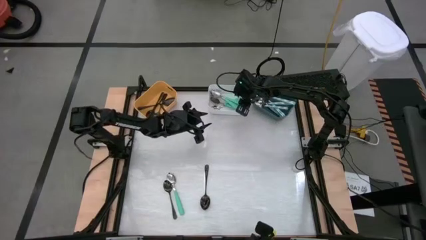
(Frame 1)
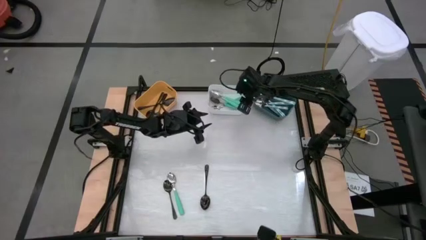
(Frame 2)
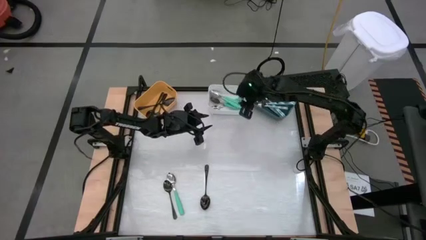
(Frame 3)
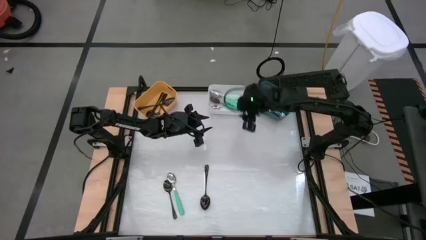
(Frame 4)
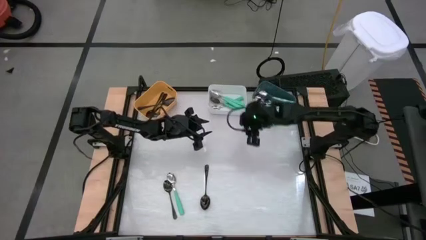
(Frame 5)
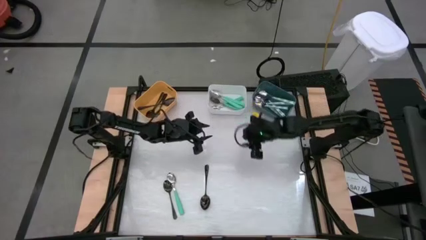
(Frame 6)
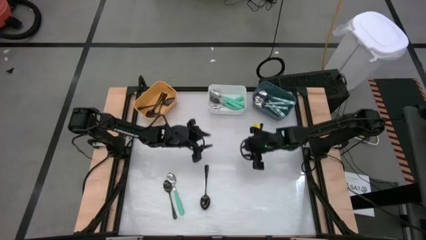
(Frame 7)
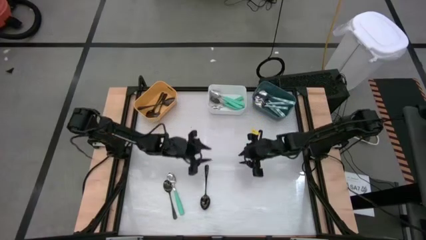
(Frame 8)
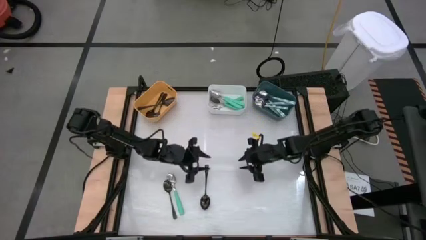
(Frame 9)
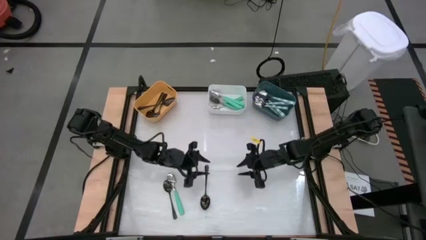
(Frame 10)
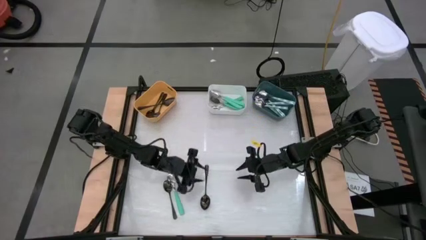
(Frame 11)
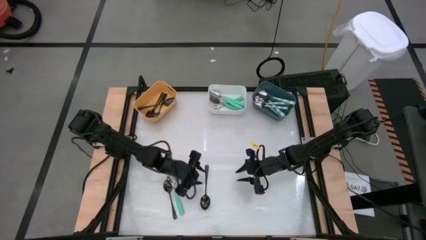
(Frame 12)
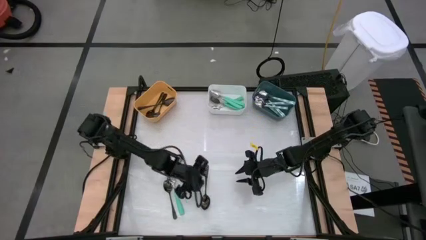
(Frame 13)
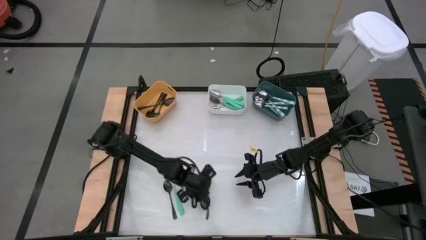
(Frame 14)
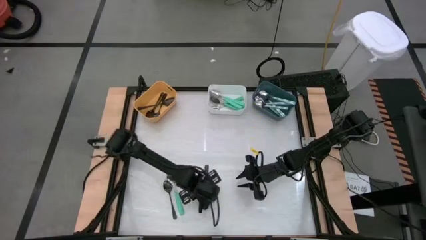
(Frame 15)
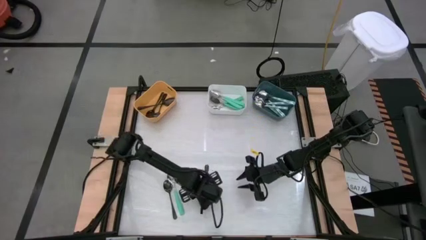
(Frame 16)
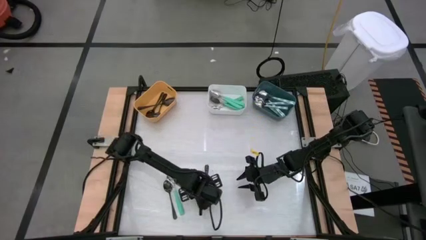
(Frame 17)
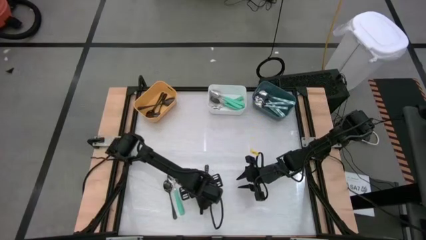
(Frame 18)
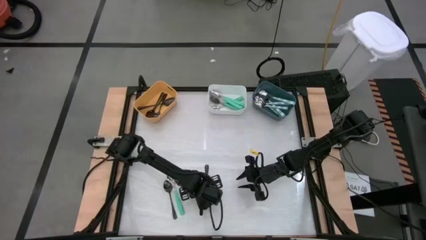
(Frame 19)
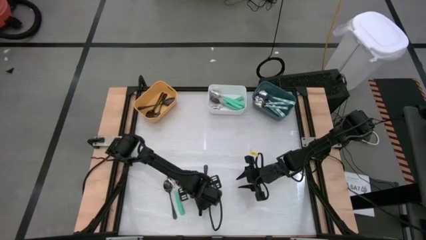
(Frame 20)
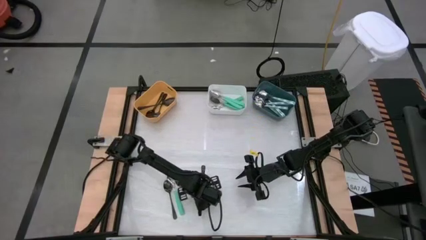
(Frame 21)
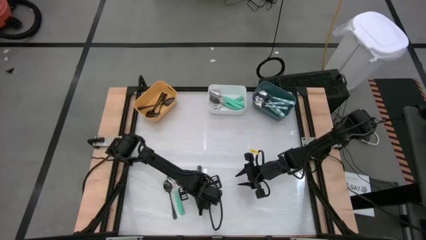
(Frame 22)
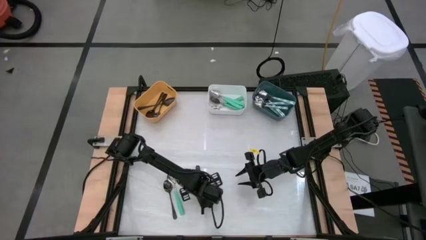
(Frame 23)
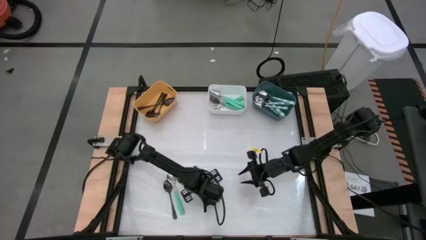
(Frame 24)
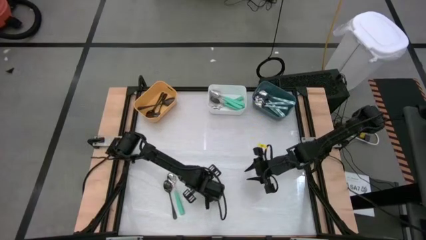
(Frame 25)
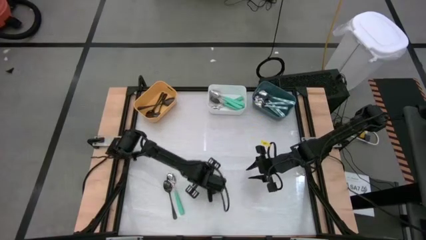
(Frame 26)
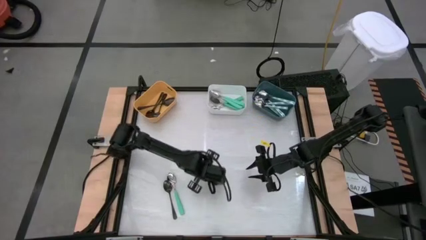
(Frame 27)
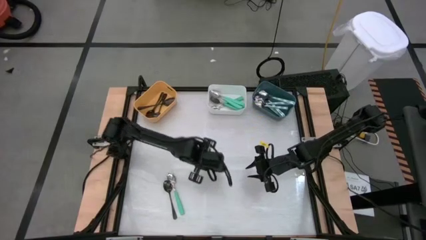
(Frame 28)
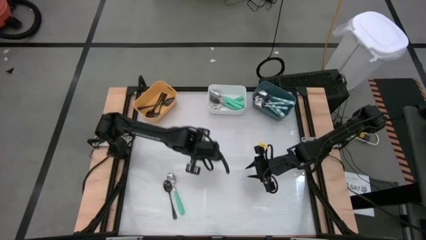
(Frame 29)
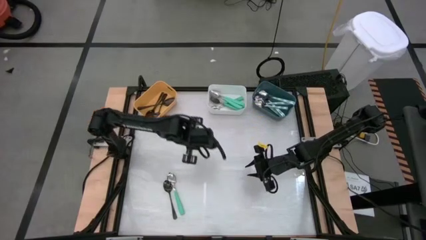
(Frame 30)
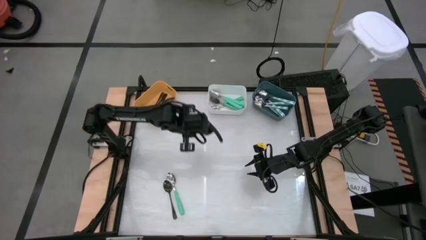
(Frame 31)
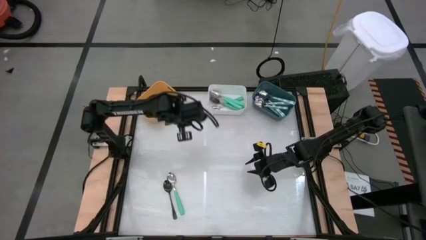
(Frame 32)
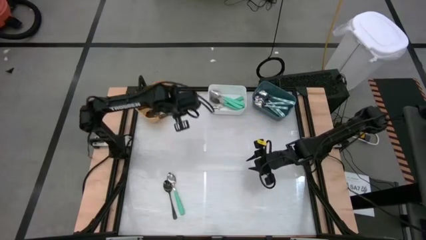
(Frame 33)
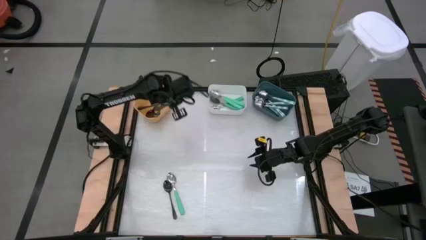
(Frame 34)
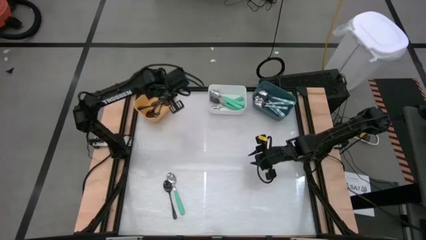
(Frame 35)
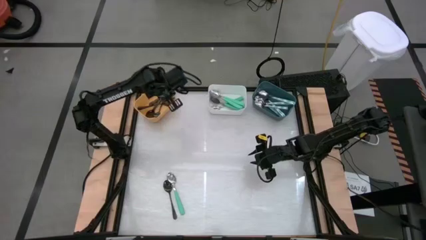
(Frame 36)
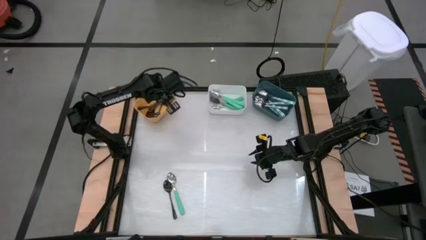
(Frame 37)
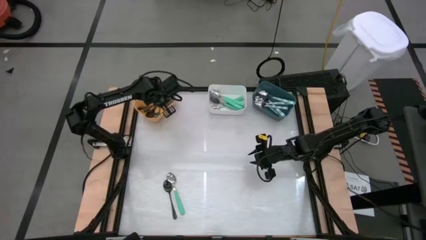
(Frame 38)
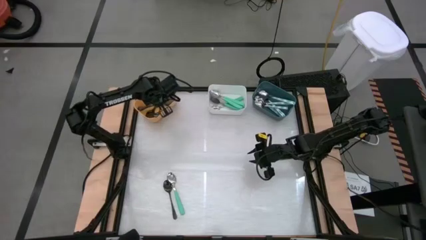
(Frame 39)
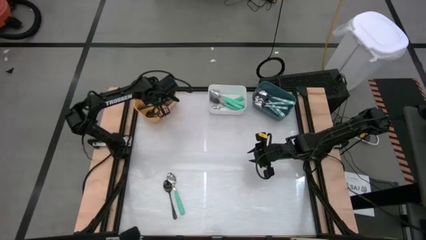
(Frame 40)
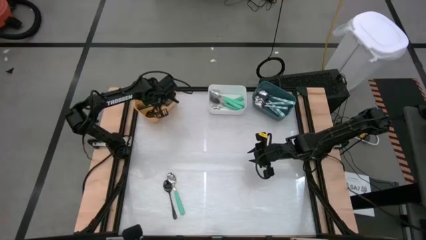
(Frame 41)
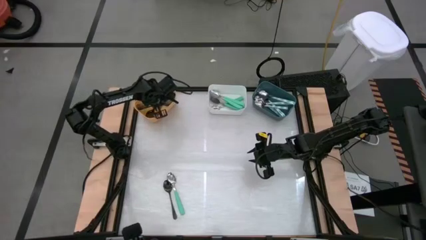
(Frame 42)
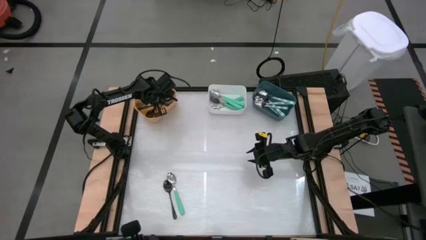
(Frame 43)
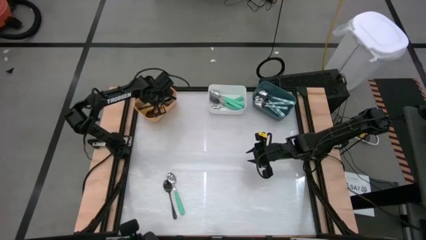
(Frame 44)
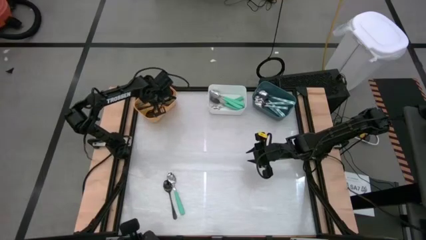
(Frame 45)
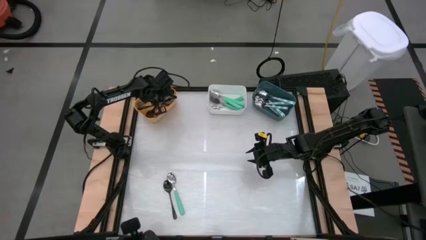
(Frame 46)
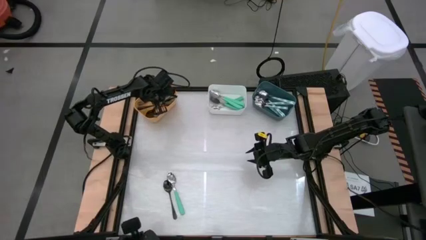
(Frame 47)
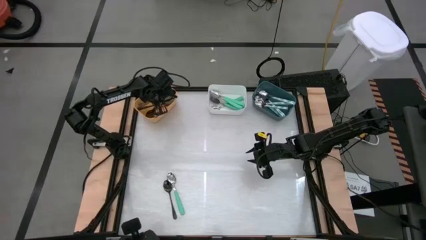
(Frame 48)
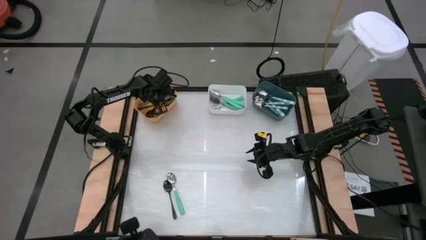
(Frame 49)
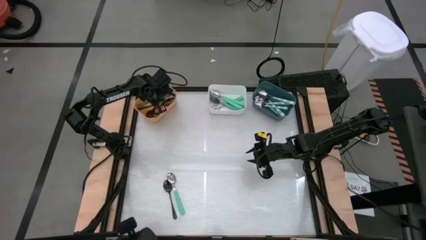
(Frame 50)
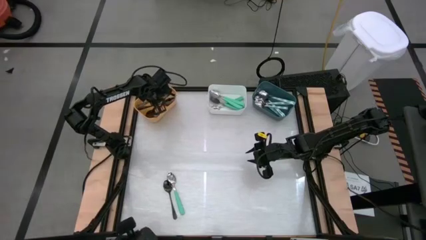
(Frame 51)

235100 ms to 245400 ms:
Task: Sort silverware by color (type)
Put the black spoon into the orange bin

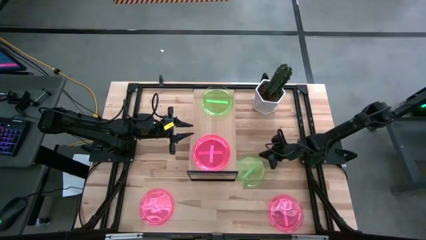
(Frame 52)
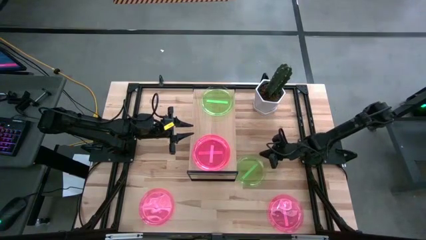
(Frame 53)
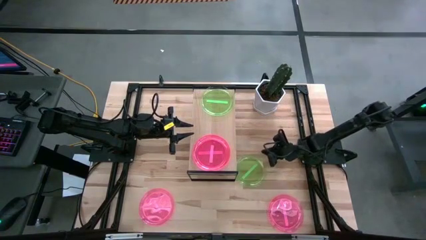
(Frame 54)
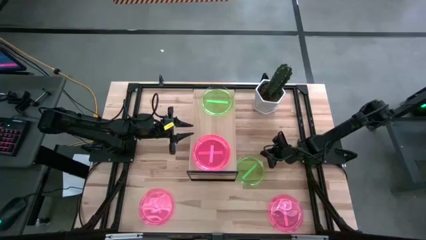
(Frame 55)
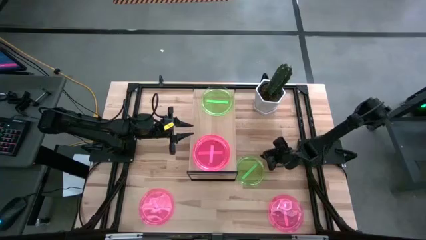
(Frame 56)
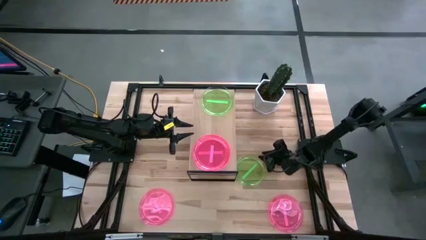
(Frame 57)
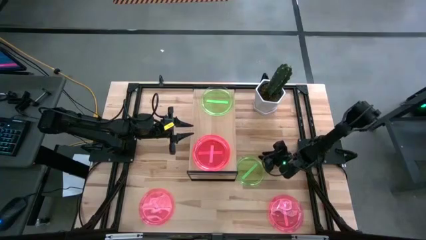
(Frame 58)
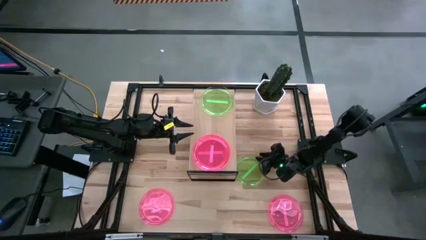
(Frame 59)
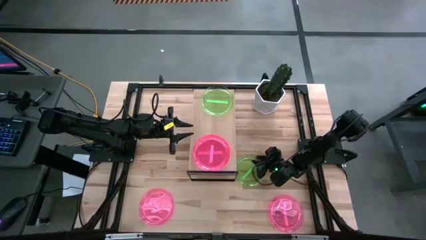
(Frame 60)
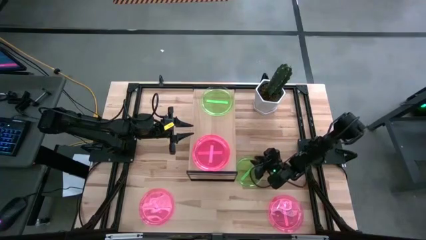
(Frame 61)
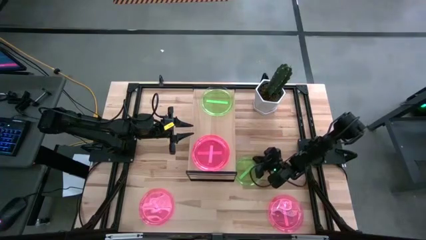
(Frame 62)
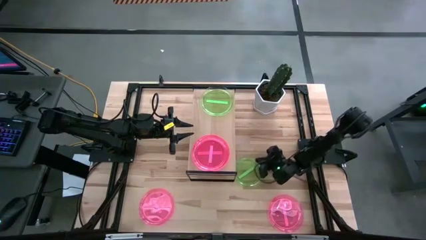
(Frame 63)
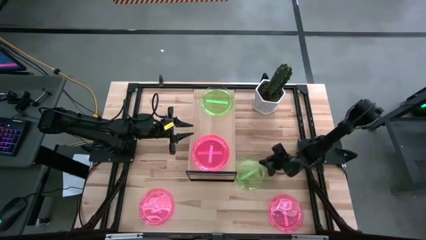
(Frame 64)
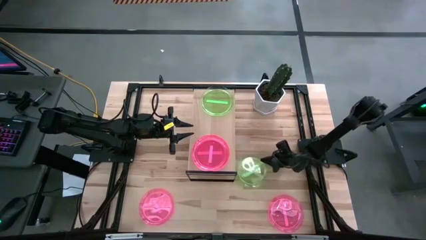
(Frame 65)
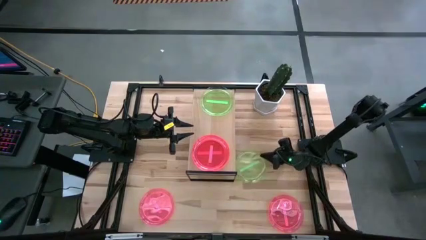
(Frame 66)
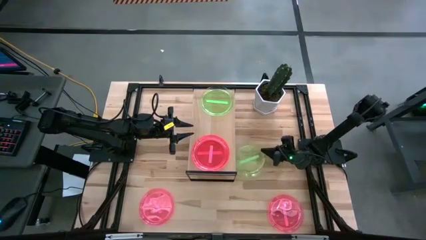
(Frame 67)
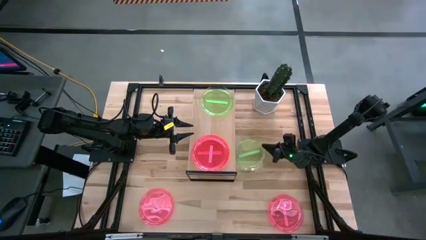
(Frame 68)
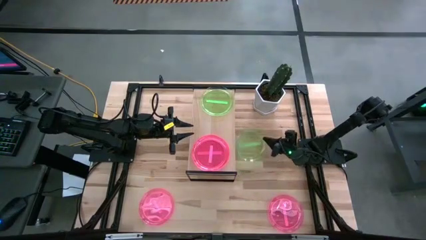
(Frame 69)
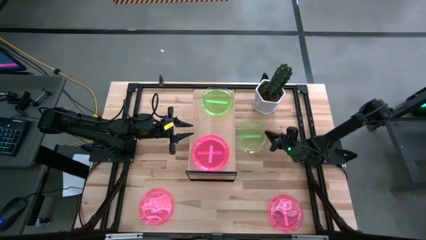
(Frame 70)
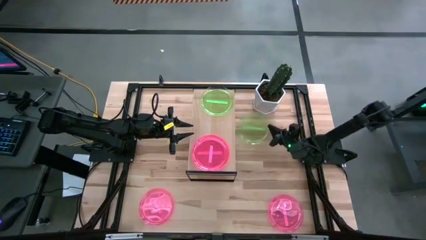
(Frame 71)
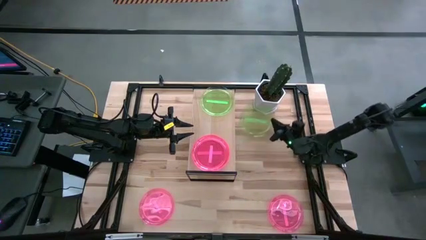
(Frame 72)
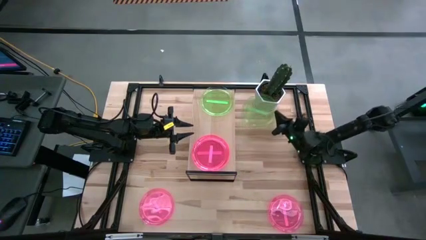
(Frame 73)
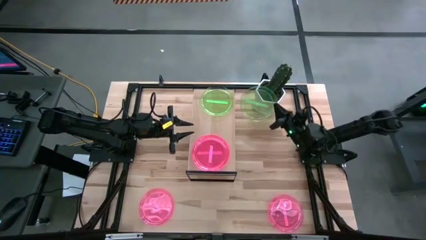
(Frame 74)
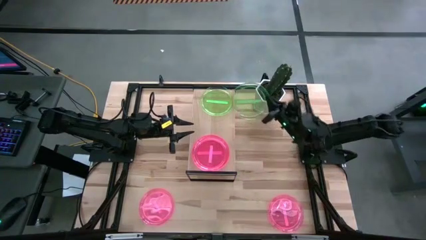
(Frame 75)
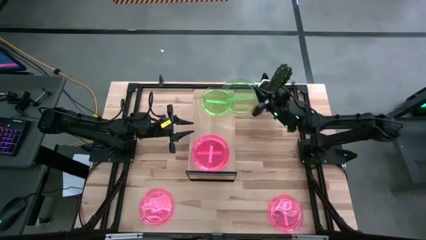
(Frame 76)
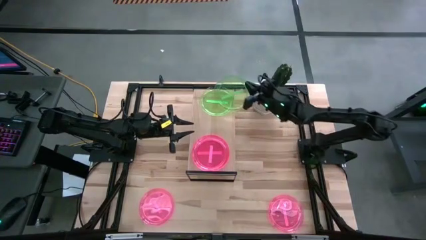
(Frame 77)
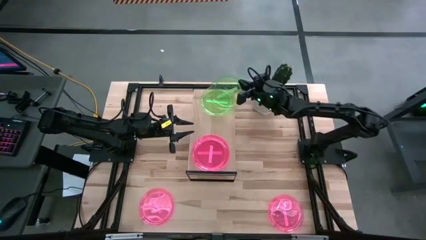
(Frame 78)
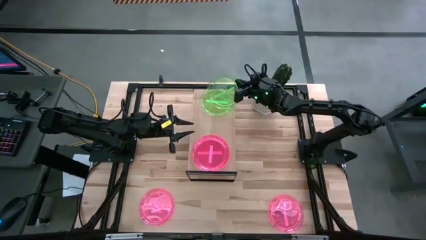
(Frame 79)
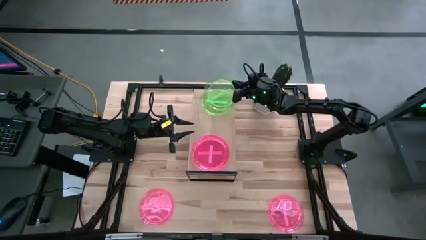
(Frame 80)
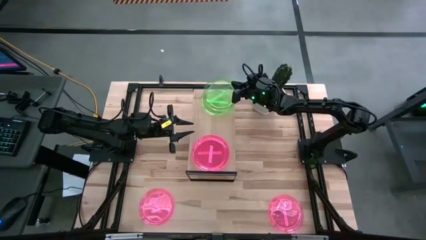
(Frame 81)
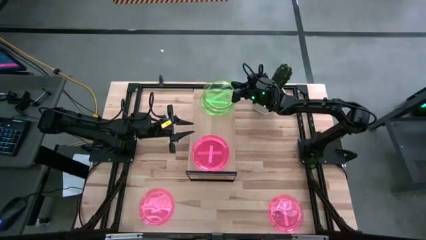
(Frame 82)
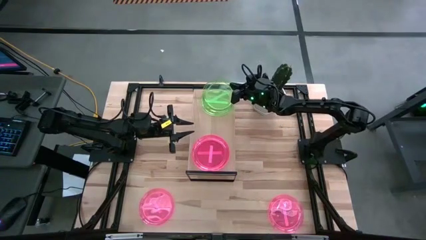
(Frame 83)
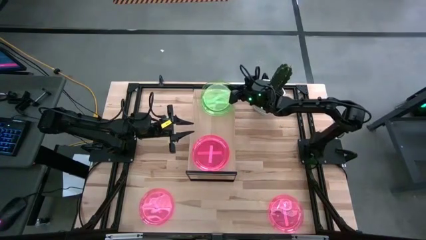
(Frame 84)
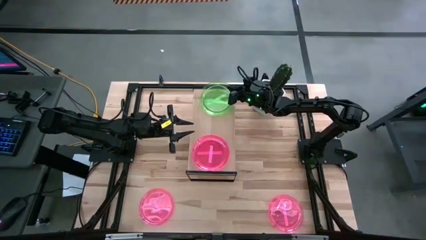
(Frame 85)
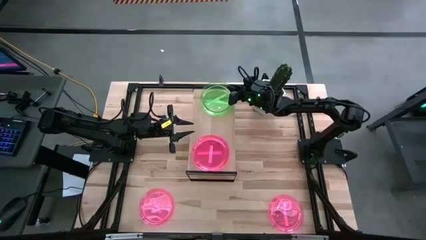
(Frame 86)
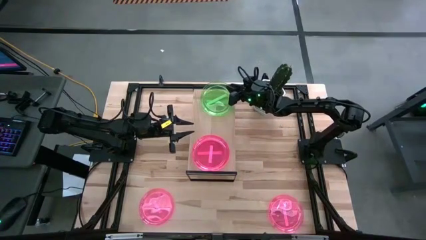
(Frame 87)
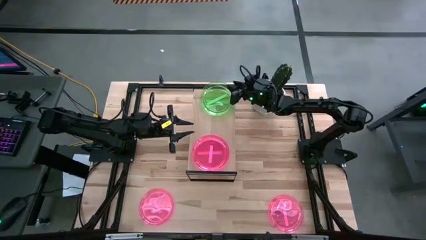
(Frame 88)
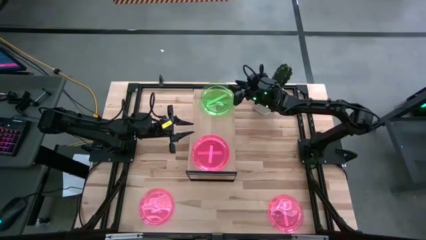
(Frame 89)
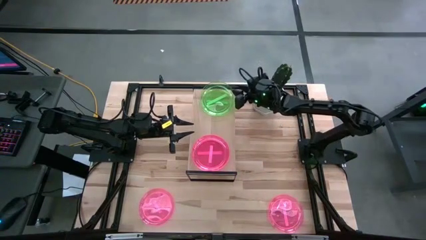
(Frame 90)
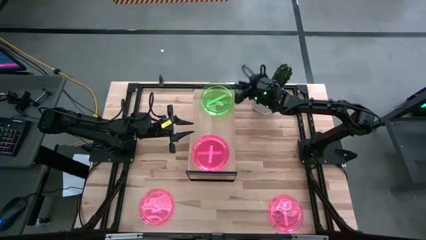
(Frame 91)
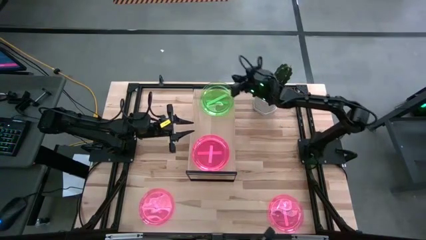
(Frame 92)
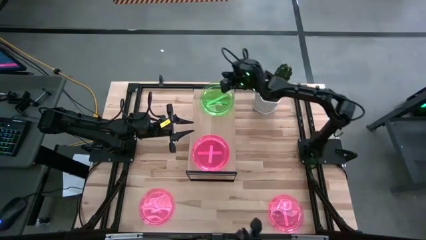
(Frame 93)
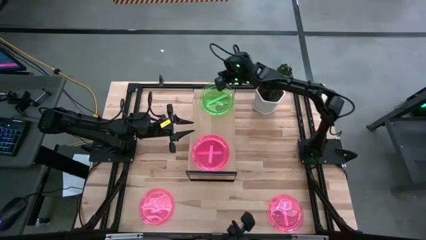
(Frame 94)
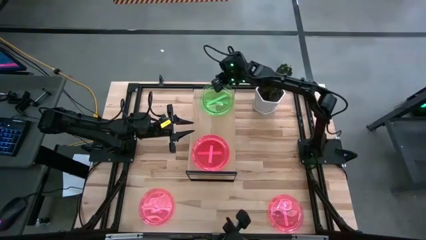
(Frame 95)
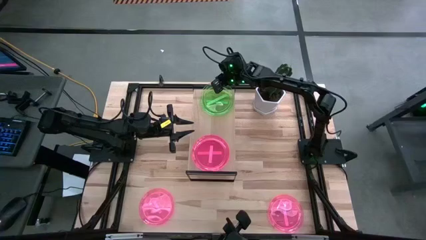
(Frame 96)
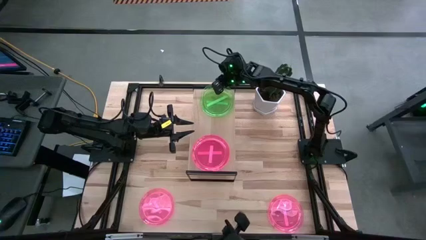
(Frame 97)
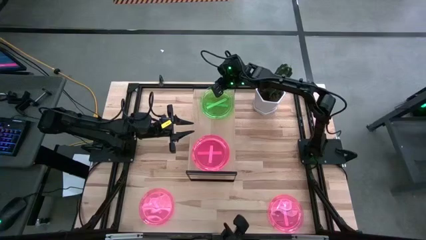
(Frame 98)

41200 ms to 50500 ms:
Task: Place and stack plates onto a shelf
Stack the green plate on top of the green plate on the shelf
